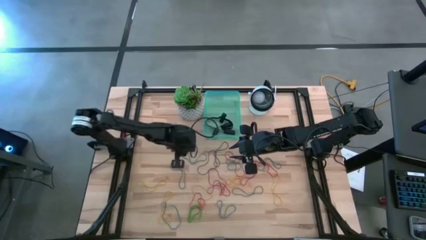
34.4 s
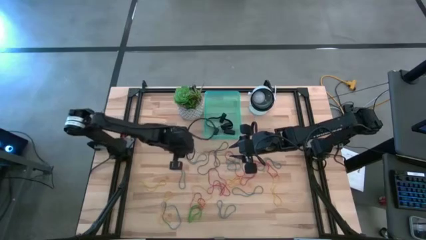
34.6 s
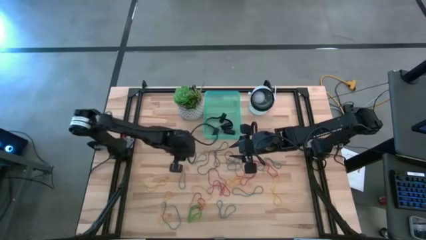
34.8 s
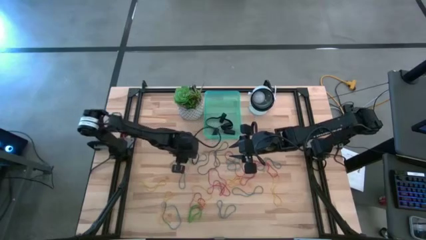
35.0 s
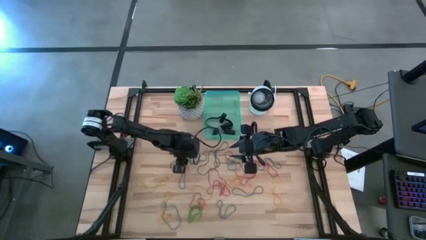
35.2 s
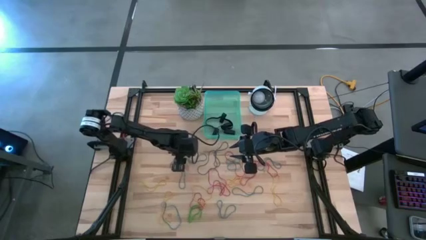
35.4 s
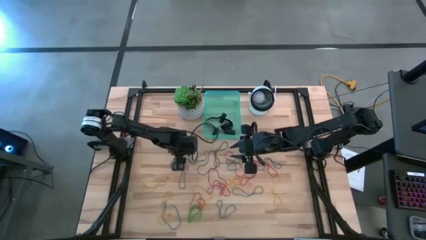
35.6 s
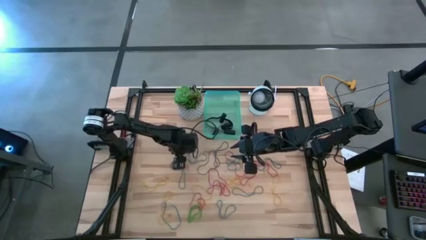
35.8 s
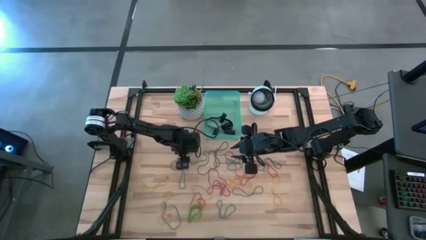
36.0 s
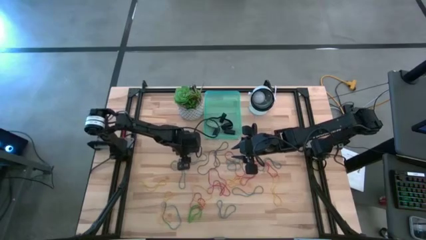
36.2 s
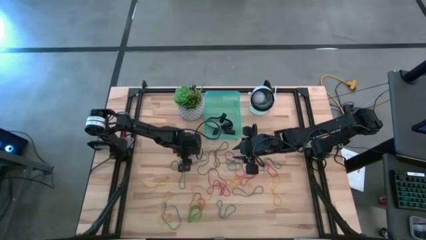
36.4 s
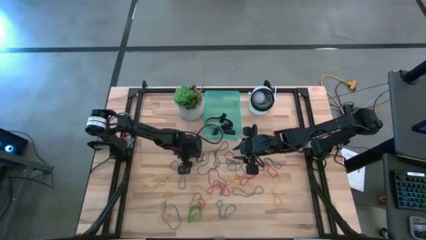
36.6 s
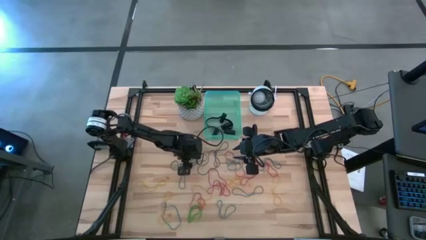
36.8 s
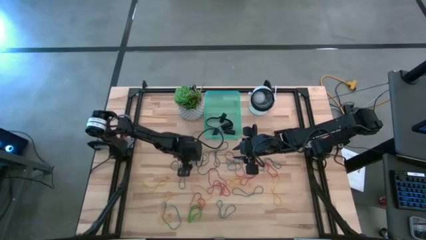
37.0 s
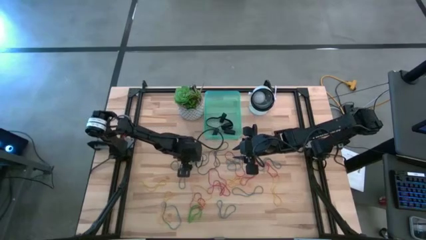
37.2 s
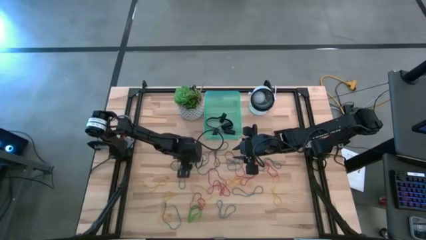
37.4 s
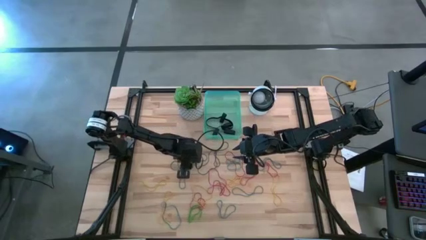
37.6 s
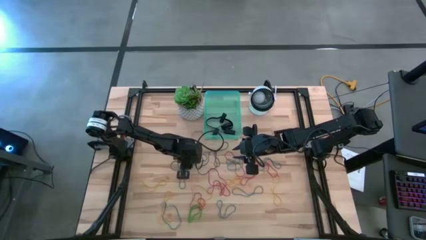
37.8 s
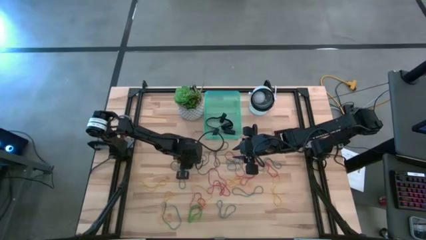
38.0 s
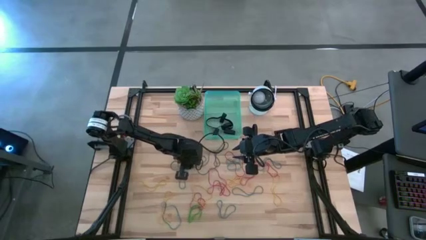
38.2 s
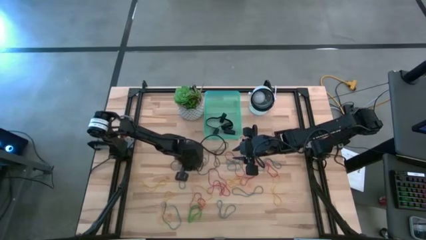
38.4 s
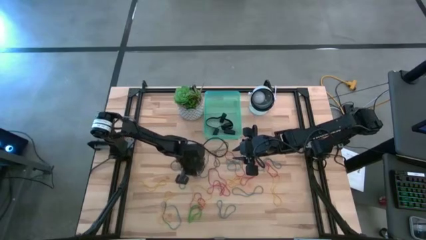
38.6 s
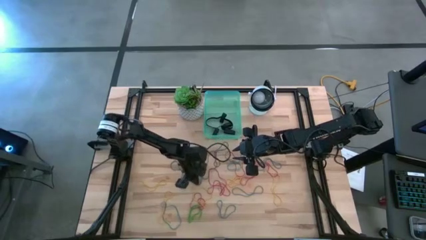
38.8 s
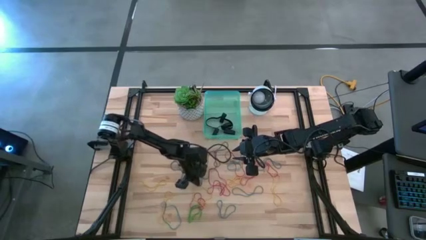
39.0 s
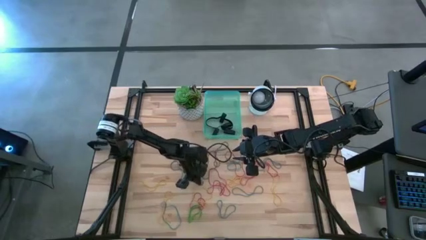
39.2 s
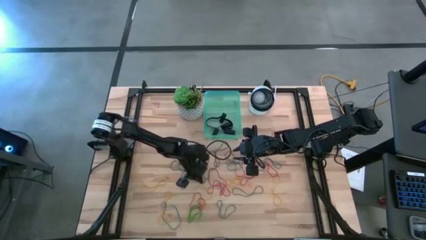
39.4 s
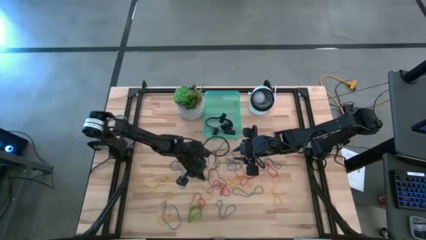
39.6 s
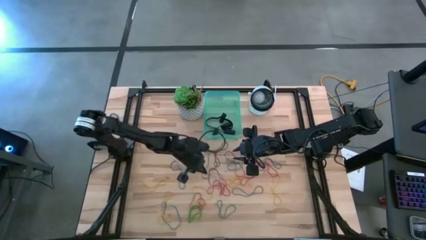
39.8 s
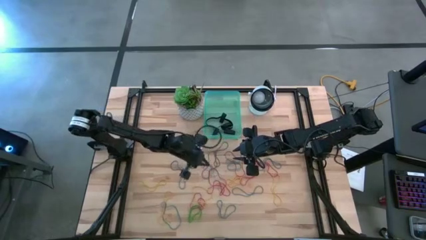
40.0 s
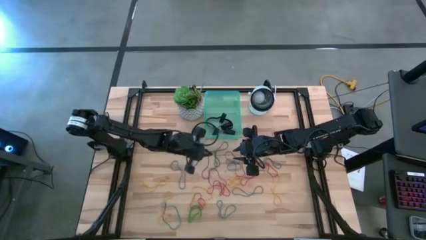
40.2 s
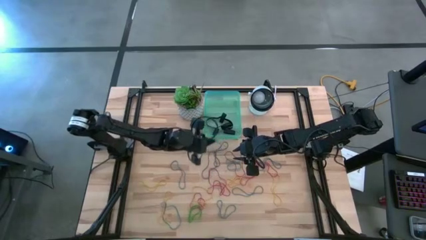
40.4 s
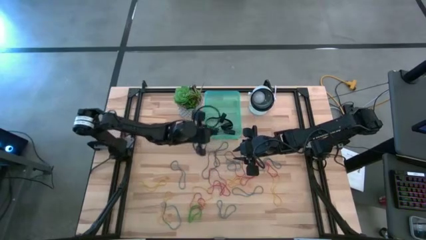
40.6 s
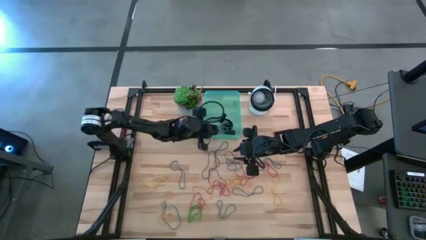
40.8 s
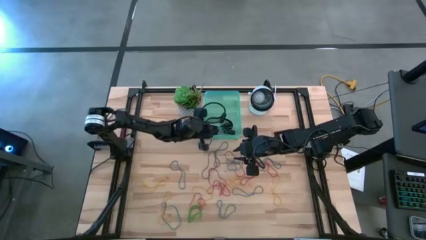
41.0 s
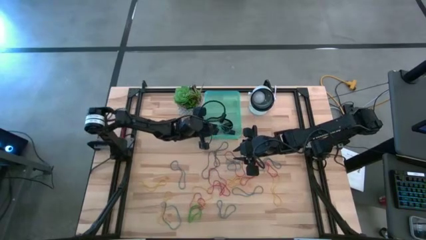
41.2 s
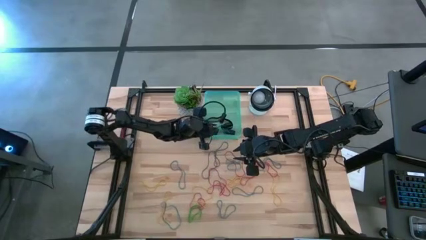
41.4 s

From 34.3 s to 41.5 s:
Task: Pick and place rubber bands into bin
Put the blue rubber band into the green bin

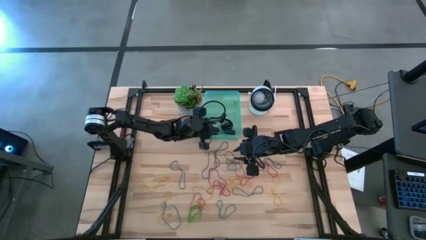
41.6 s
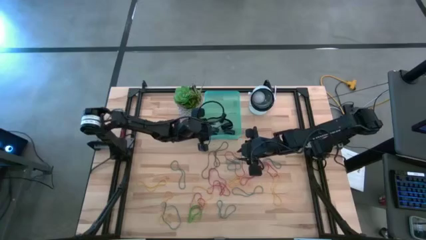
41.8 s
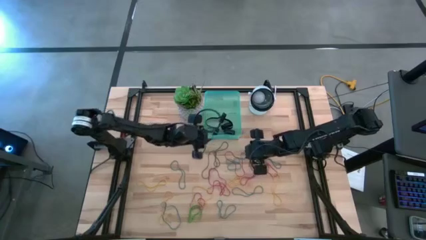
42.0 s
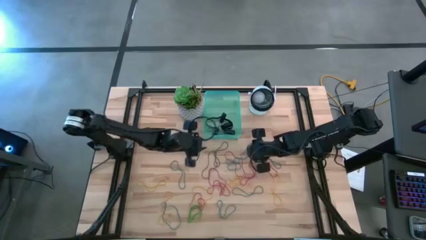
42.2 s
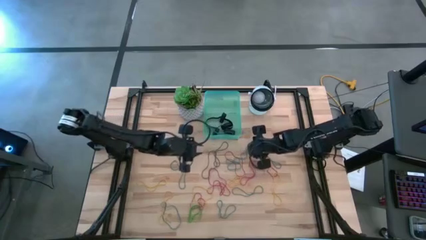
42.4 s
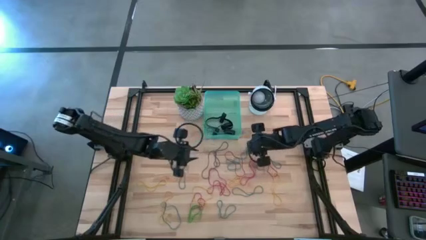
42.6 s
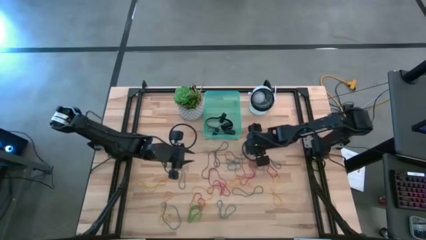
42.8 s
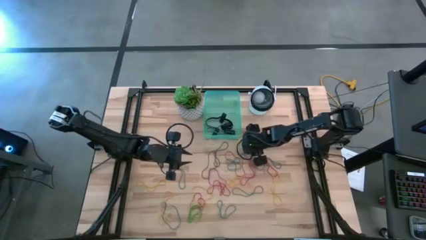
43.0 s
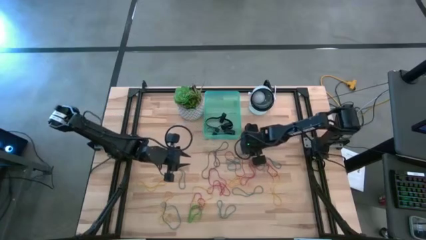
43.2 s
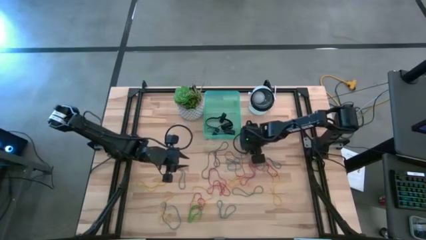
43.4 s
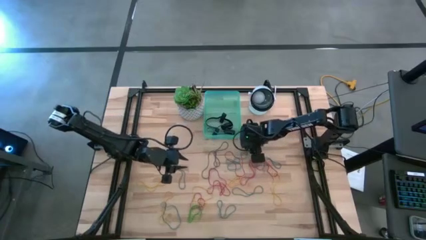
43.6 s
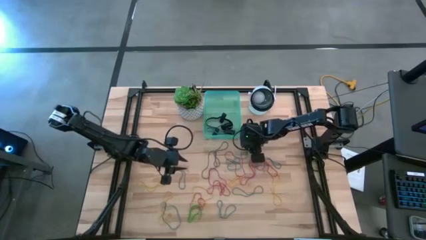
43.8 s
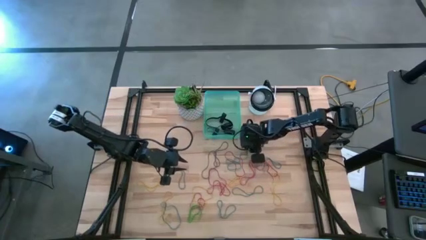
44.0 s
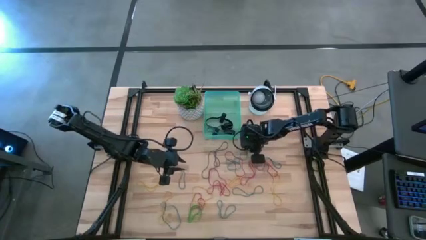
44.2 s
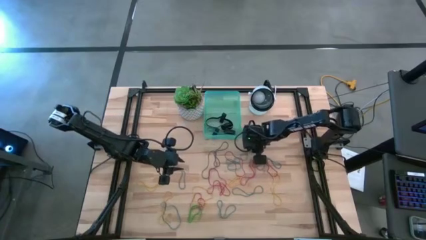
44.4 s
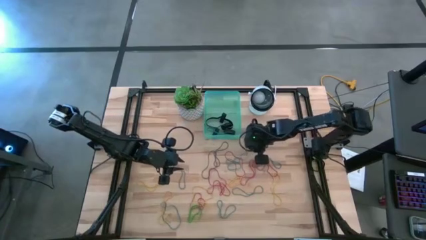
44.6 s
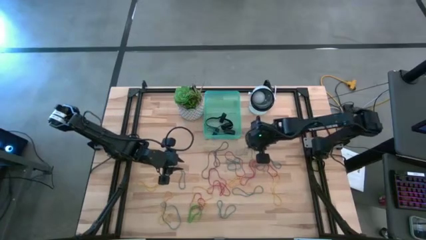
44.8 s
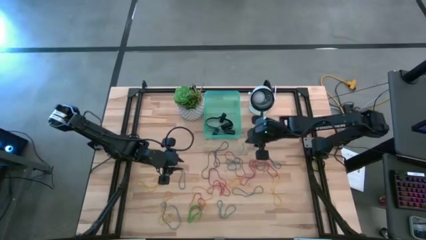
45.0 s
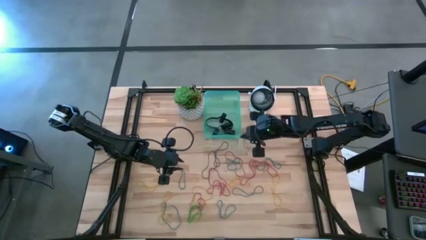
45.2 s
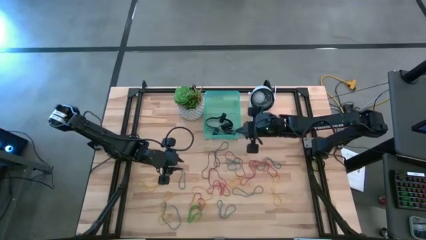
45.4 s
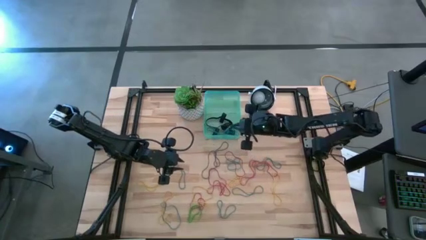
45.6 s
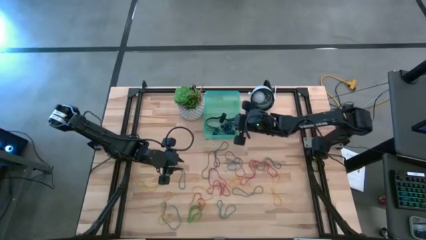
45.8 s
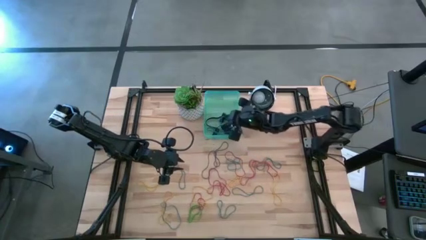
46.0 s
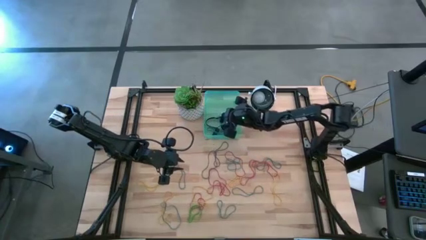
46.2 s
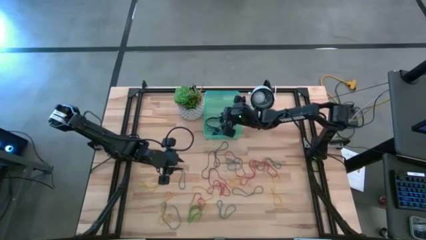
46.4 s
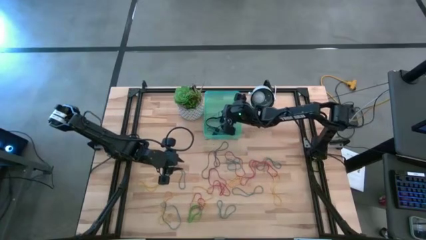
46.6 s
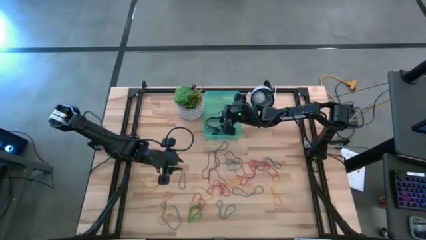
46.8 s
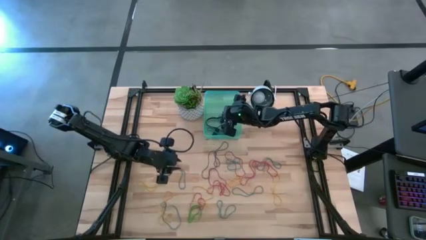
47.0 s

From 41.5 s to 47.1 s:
Put the blue rubber band into the green bin

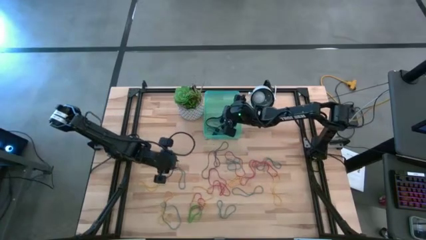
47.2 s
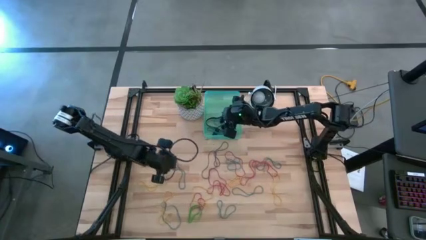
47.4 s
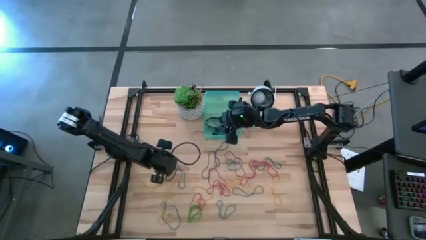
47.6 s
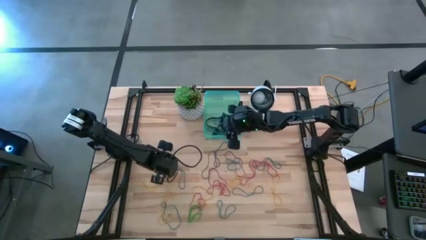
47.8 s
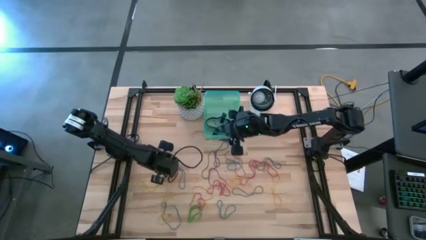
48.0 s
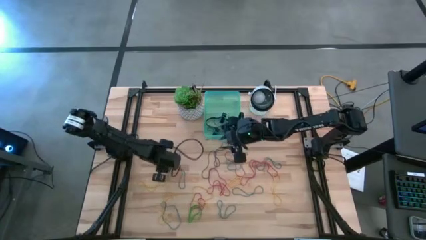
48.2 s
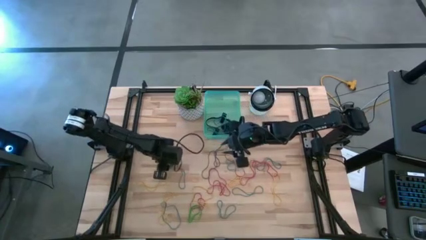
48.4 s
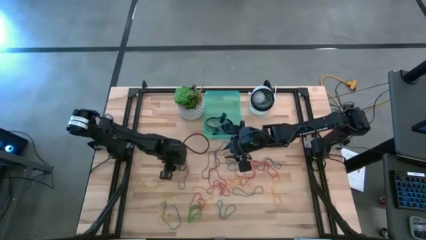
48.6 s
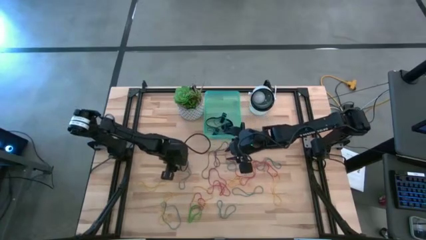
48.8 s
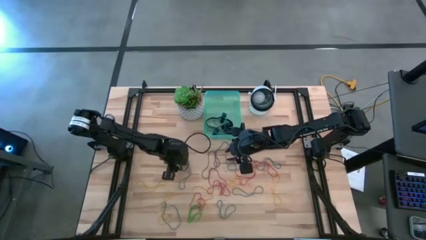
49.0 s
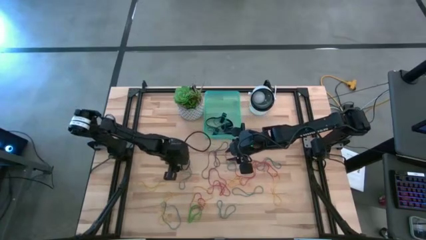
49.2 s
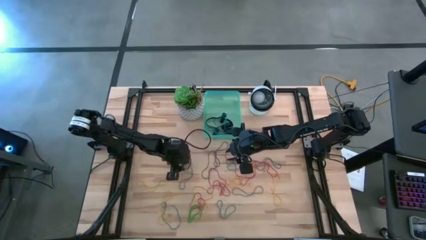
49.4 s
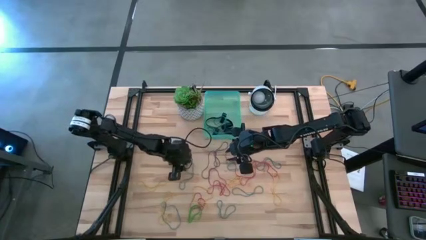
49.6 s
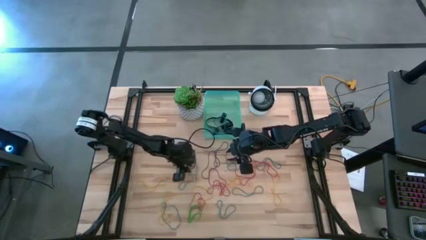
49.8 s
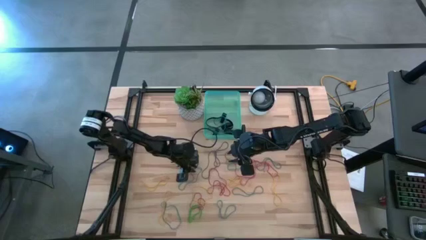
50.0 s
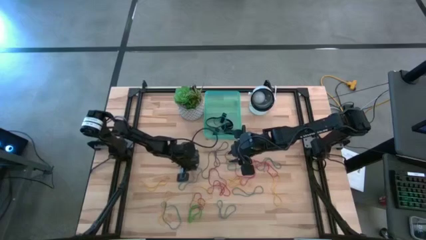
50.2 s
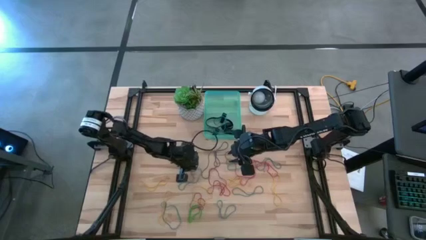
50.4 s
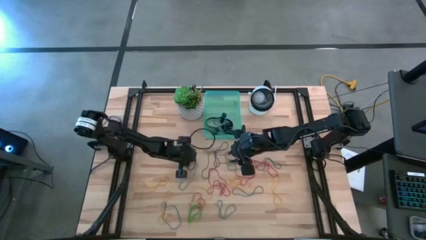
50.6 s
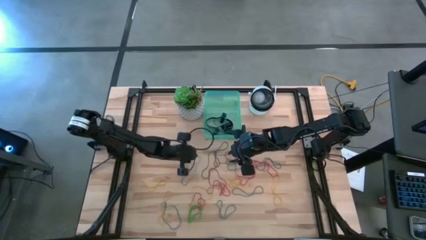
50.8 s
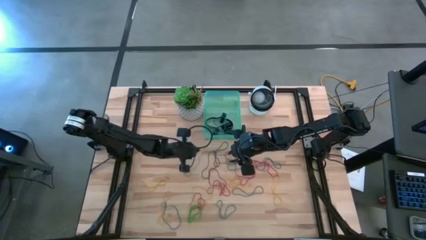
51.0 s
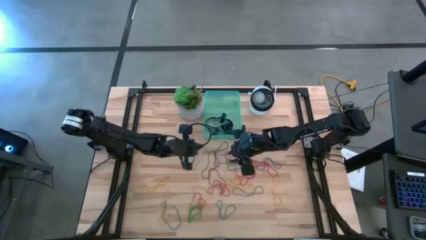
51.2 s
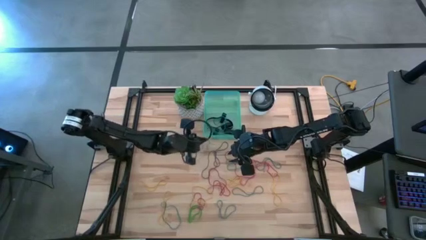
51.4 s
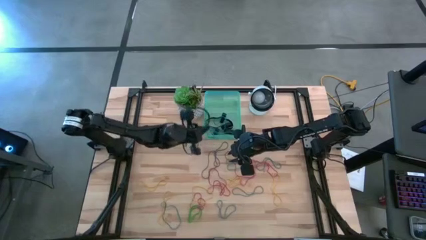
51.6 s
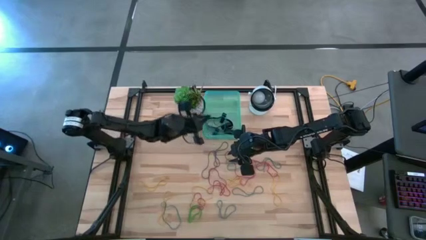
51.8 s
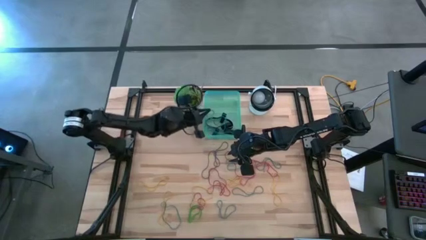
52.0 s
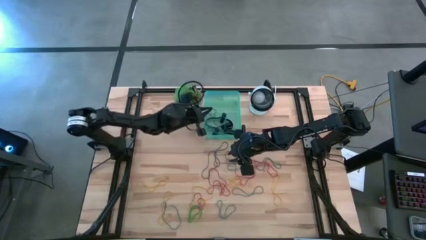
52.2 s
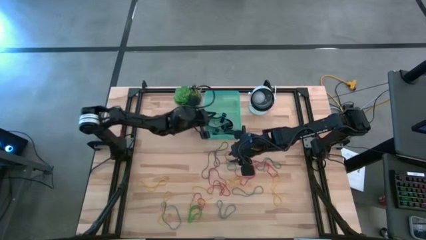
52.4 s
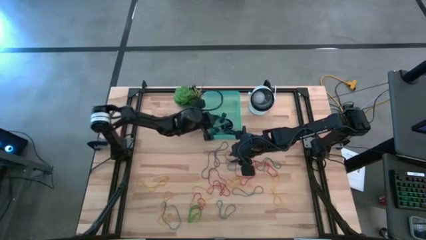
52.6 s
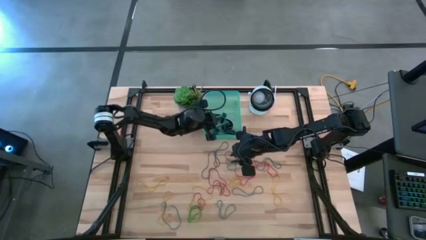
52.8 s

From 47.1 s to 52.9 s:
Put the blue rubber band into the green bin
